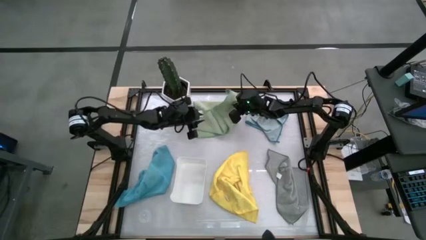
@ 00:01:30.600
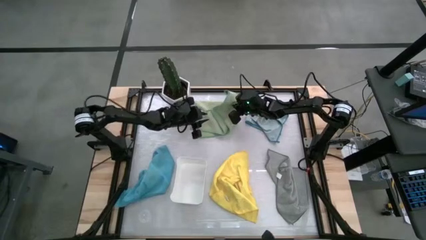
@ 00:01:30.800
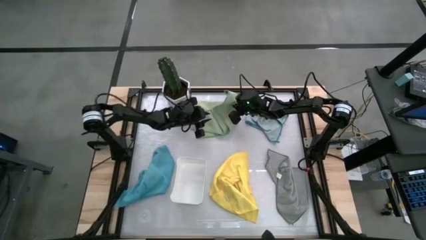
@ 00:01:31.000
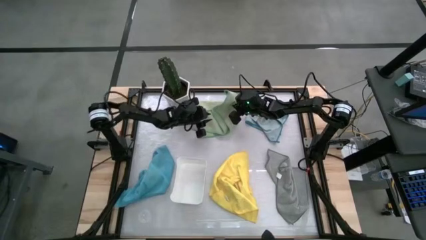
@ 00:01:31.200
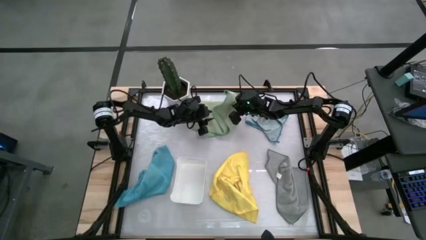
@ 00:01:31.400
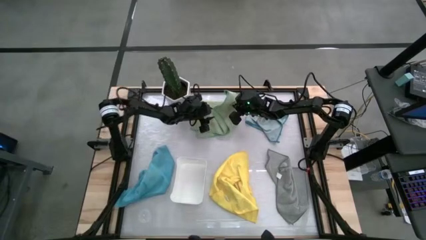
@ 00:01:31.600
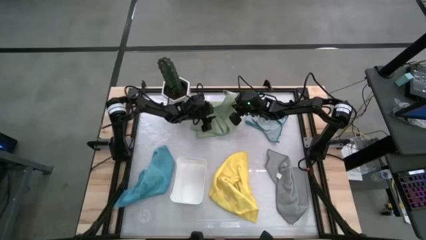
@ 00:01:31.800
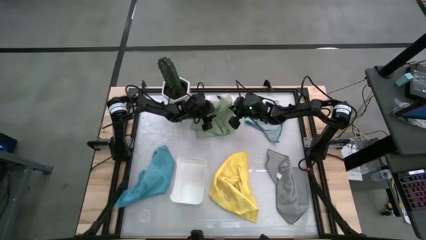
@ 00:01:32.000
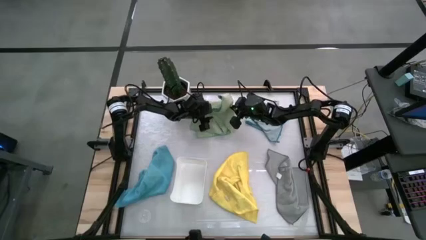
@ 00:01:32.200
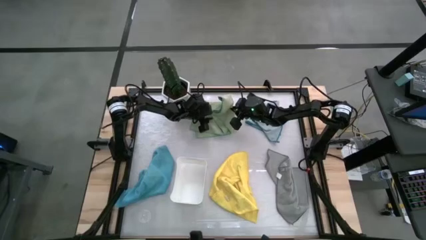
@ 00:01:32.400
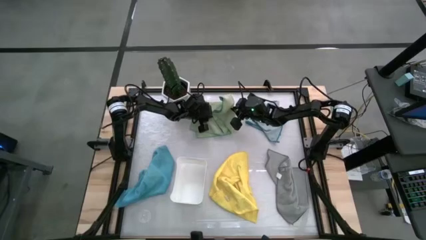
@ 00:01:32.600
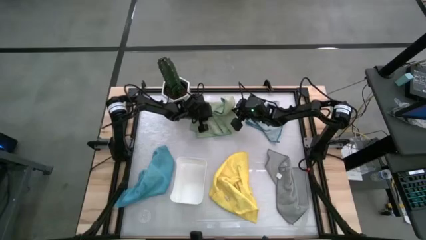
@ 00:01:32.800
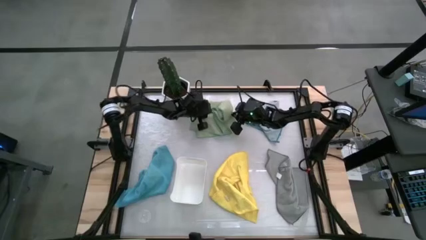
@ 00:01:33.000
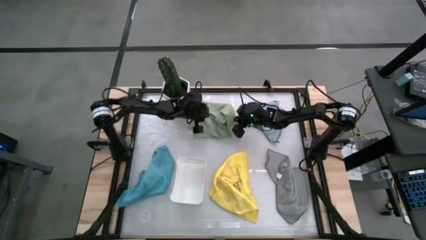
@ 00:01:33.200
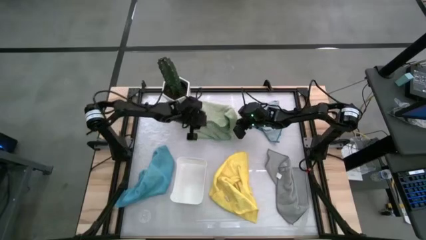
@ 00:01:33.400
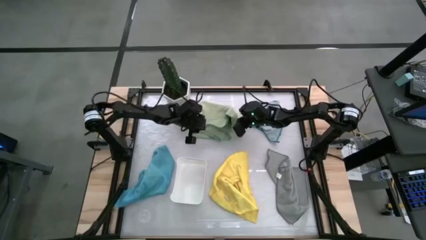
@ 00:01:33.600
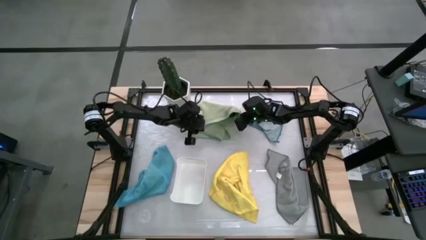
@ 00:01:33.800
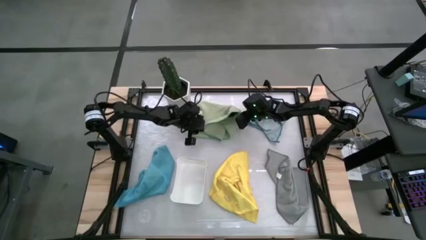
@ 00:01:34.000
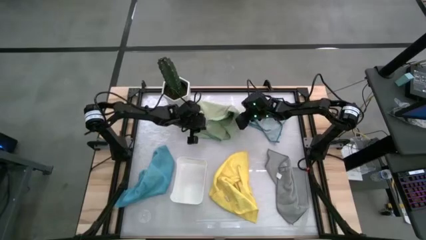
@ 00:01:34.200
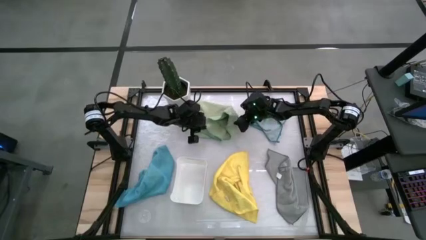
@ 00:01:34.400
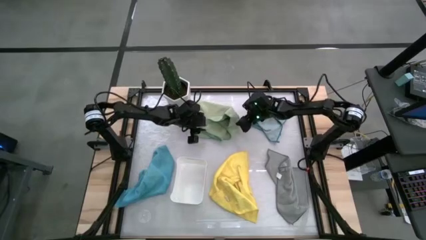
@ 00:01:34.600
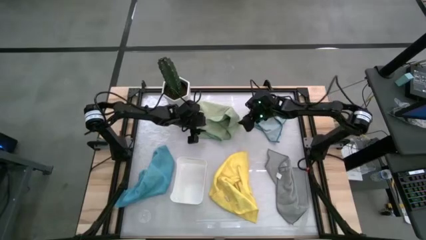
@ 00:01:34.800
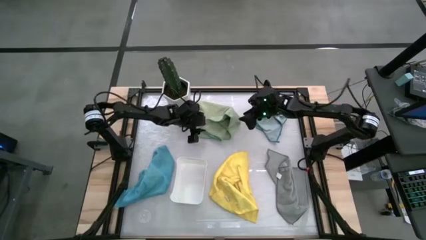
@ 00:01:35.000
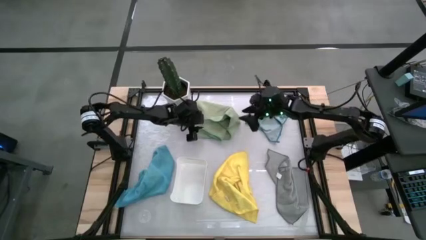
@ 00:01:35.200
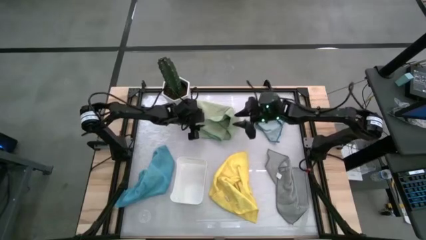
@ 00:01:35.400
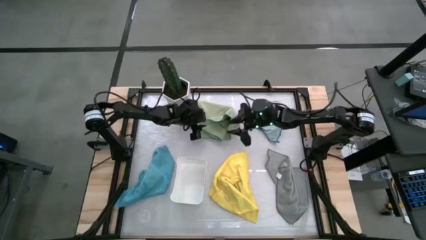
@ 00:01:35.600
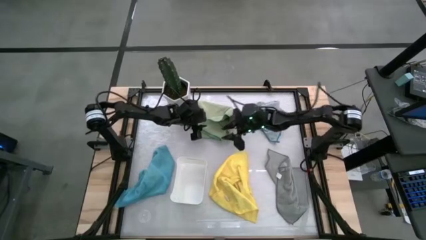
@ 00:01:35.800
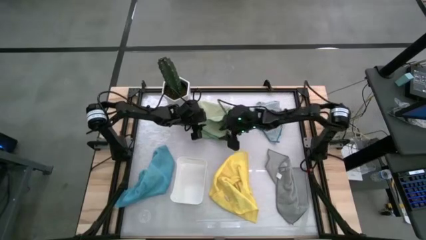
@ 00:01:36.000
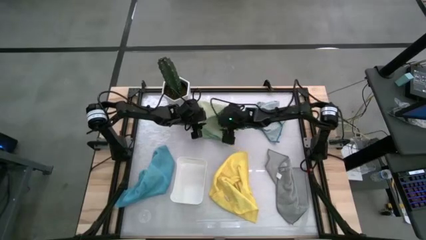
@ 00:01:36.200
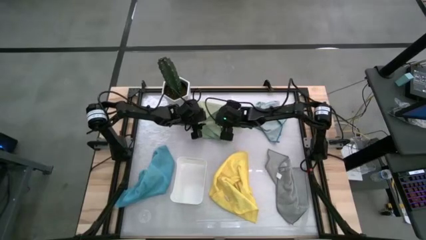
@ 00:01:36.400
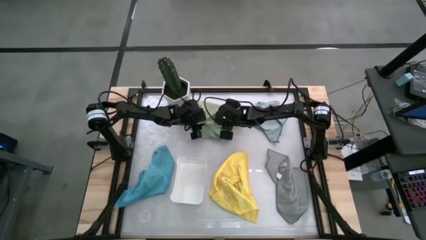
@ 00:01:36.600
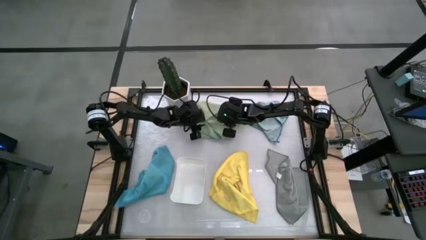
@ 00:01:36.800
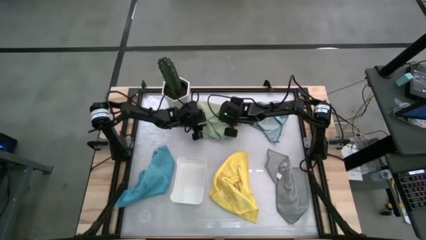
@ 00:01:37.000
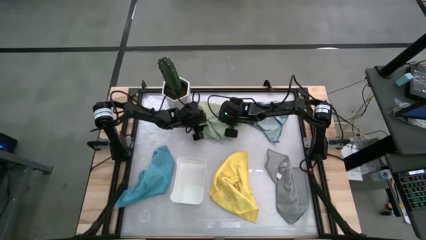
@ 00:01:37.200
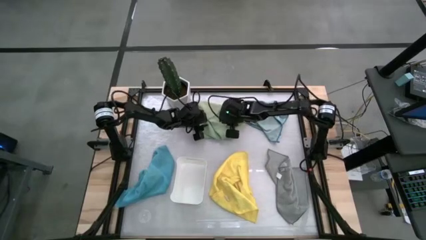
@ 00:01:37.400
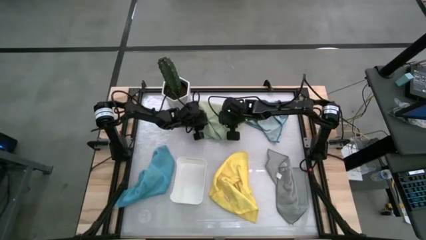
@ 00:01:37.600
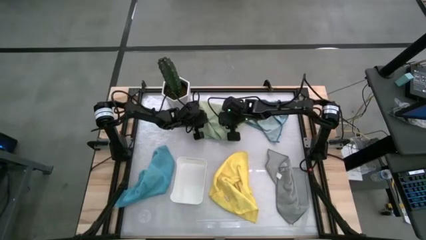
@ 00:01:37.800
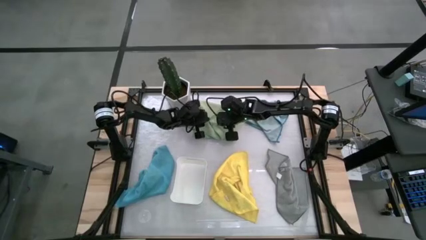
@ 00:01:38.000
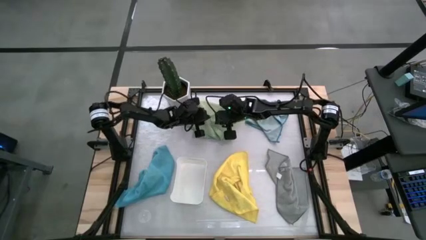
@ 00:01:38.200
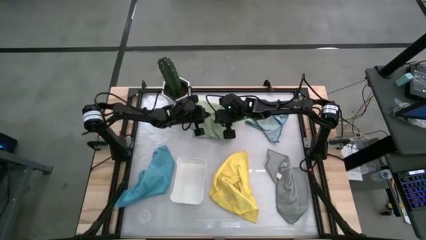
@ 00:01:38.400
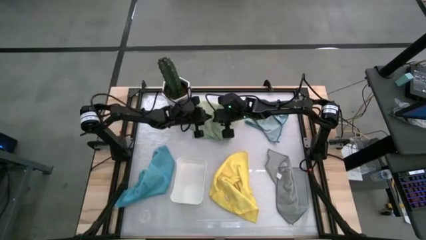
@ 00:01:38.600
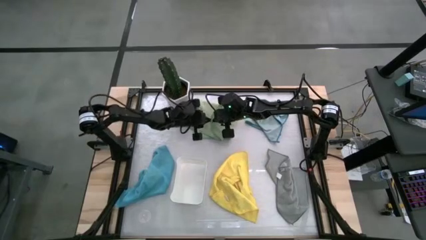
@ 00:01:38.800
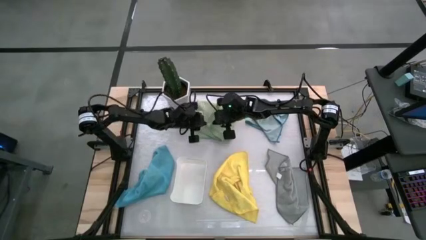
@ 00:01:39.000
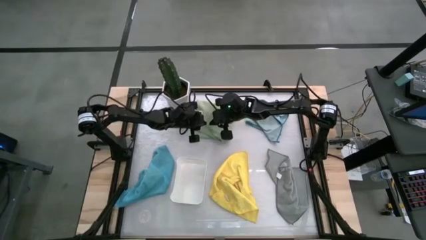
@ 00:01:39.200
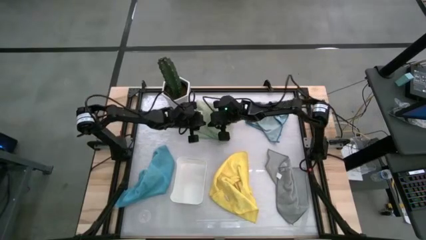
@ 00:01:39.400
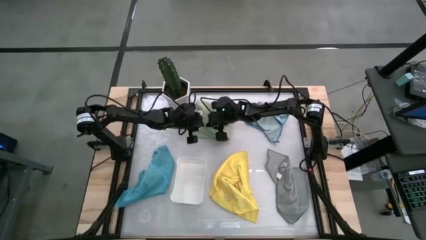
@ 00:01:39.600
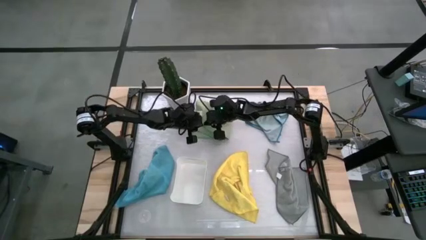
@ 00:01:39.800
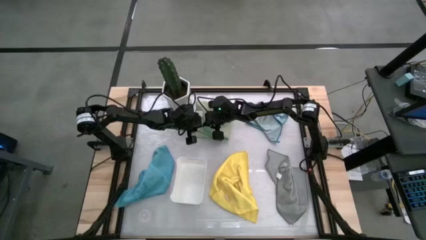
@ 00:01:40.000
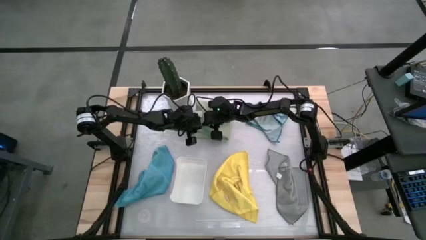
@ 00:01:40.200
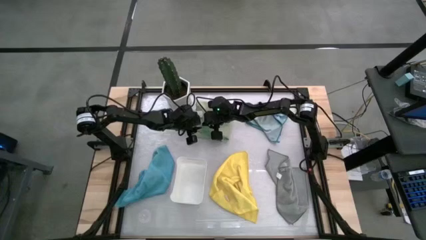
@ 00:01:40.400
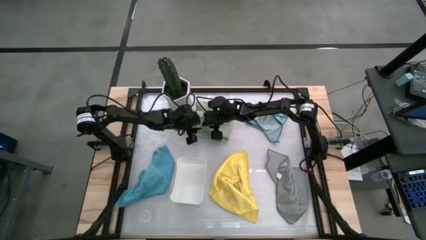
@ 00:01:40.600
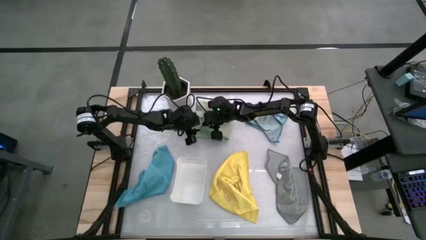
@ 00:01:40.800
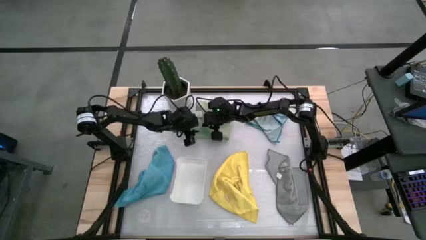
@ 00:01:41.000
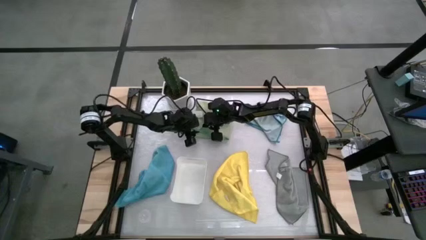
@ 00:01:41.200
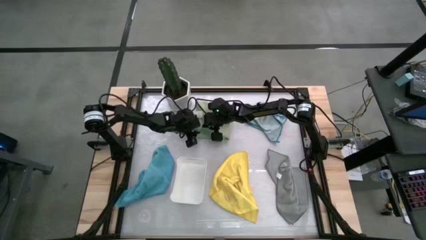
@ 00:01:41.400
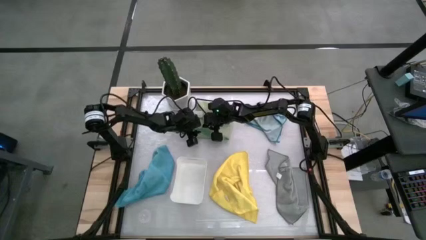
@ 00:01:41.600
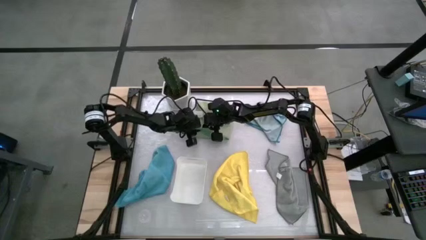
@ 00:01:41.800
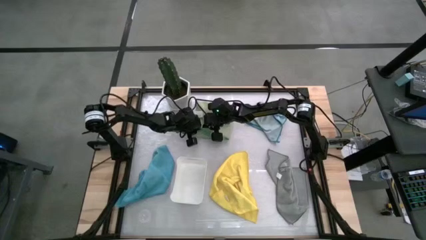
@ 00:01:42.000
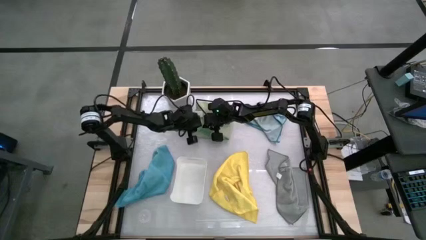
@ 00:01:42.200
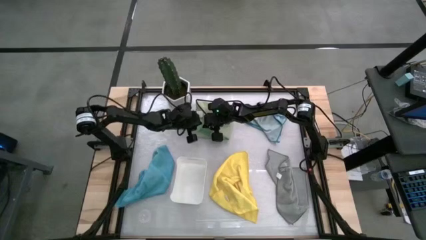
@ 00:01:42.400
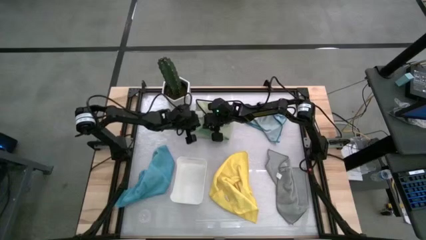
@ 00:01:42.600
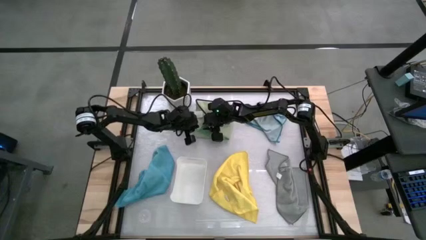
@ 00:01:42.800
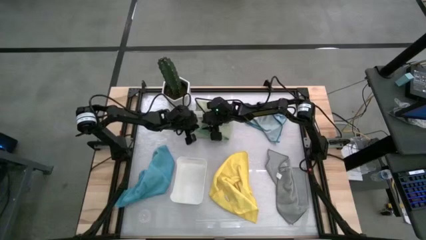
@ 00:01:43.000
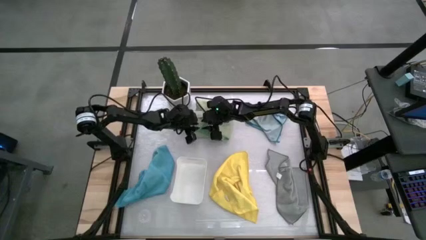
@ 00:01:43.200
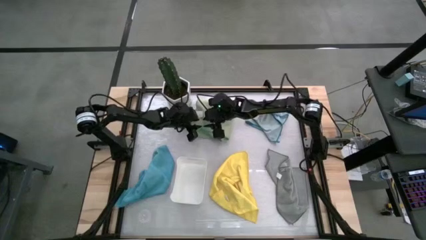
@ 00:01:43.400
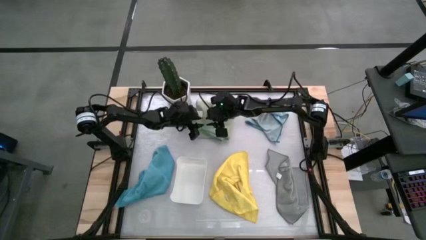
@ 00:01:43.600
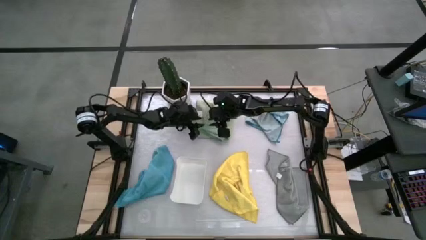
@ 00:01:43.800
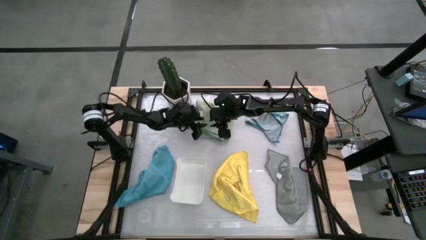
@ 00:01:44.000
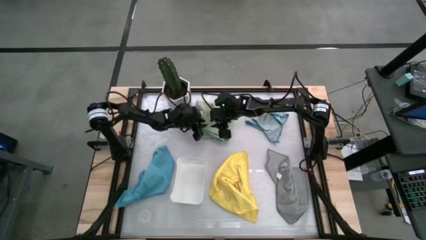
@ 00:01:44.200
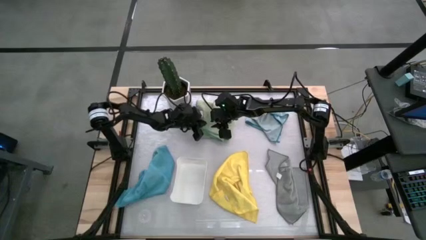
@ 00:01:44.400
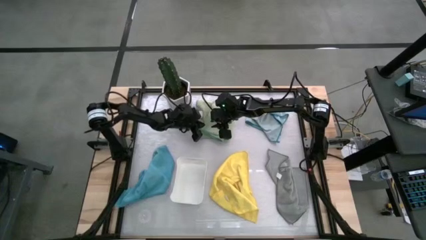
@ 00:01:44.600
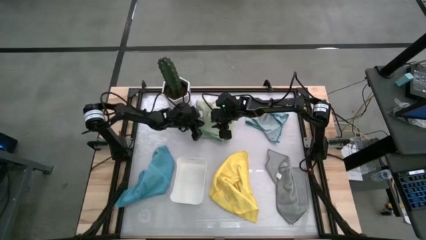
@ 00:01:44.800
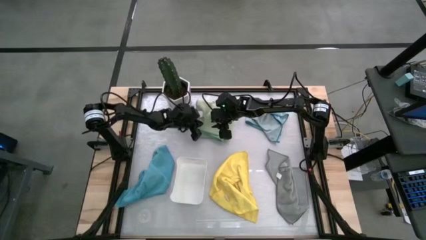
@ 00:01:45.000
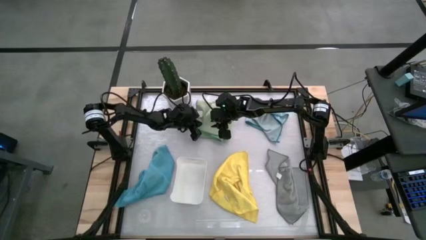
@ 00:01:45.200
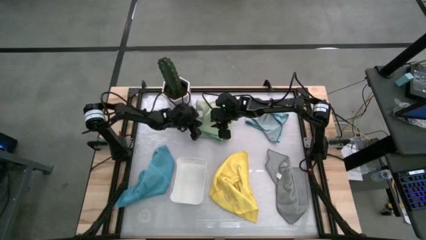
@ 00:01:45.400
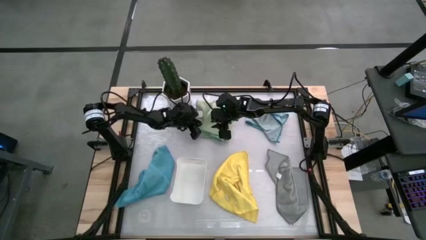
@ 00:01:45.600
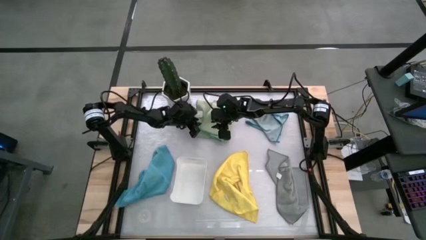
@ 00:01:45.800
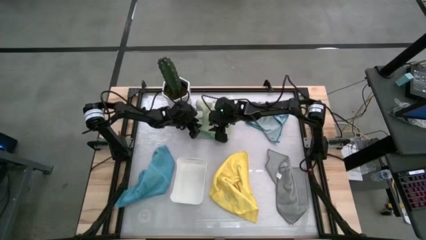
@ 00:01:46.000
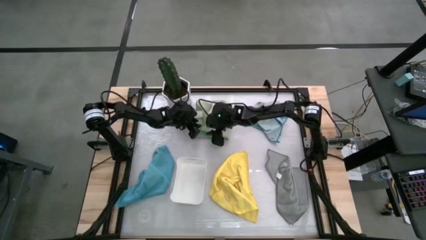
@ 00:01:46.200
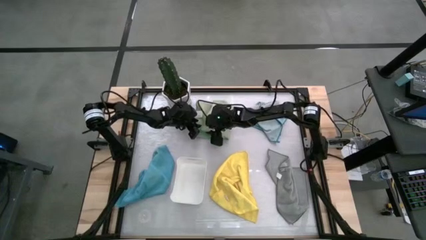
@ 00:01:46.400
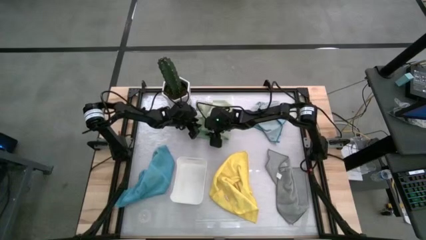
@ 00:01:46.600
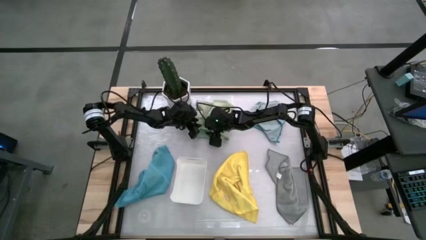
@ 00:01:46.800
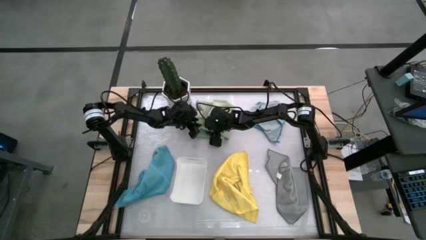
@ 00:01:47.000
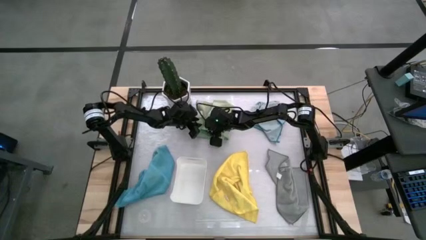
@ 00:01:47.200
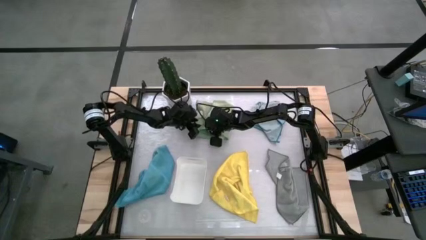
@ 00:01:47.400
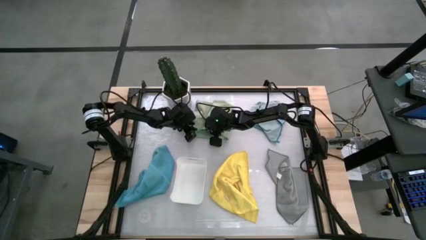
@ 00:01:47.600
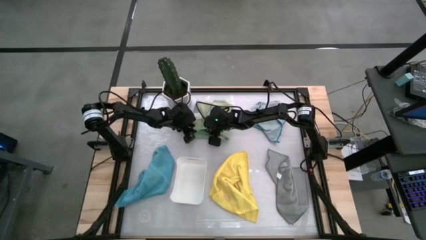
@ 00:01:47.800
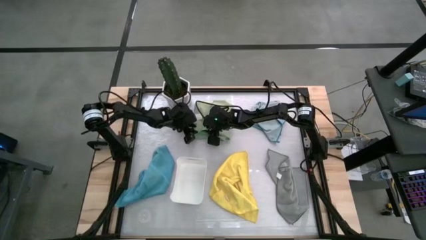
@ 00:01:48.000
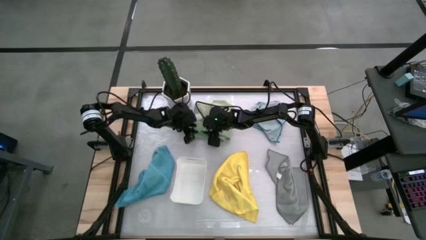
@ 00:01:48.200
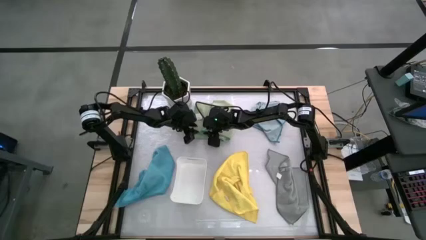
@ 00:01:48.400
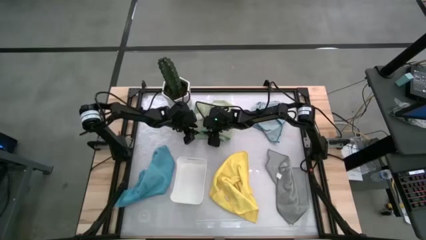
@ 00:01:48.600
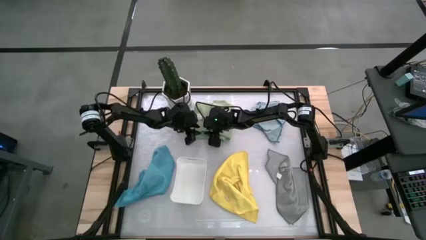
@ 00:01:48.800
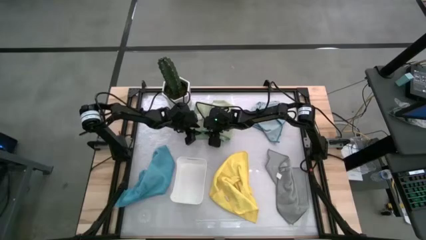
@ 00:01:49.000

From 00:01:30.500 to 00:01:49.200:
Task: Fold microfiber towels
Fold the green microfiber towel
